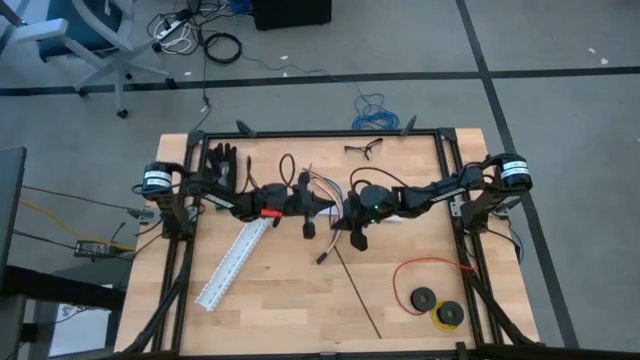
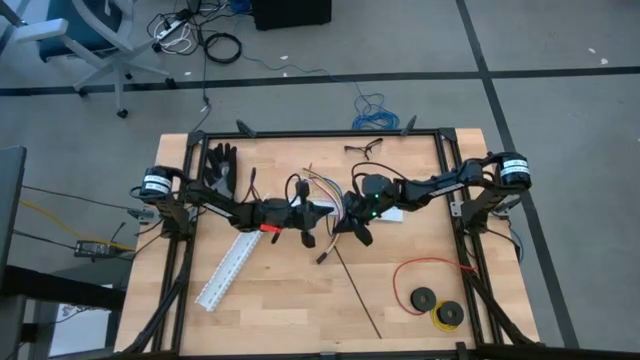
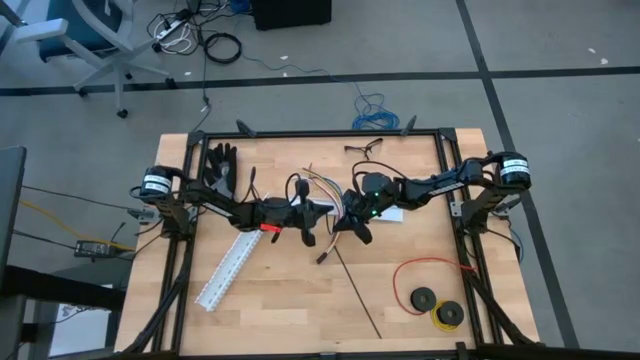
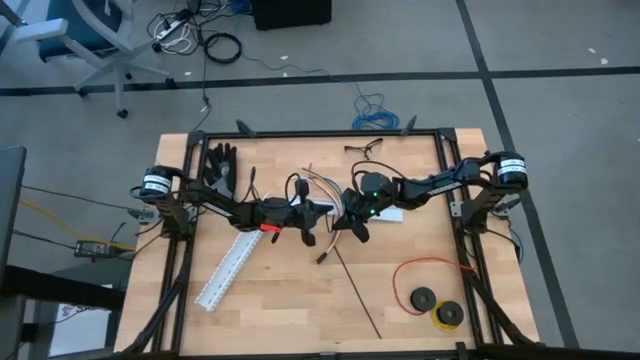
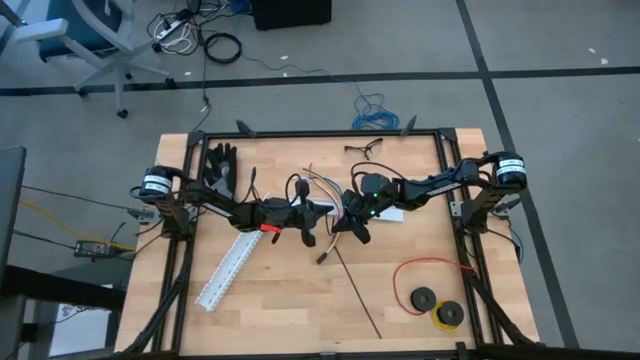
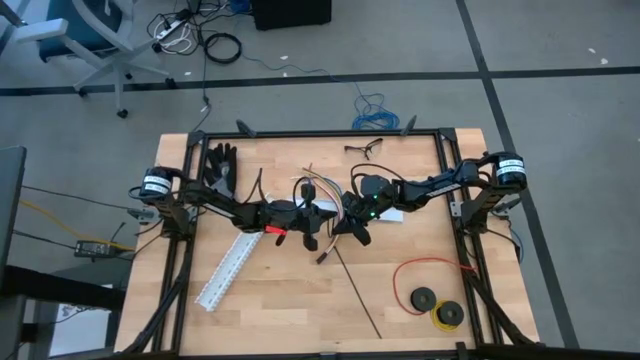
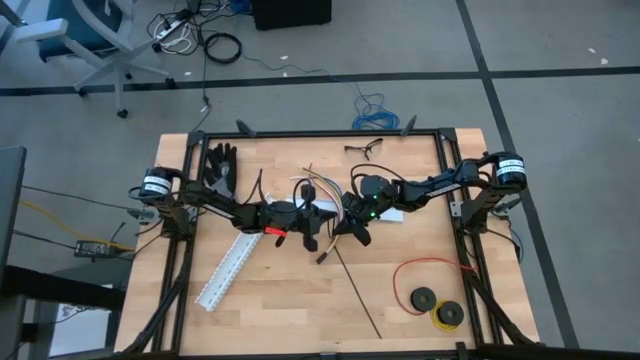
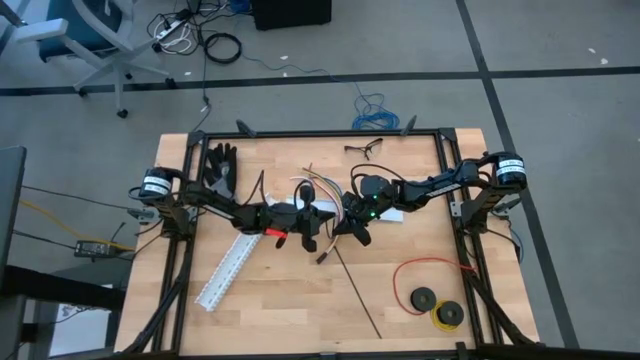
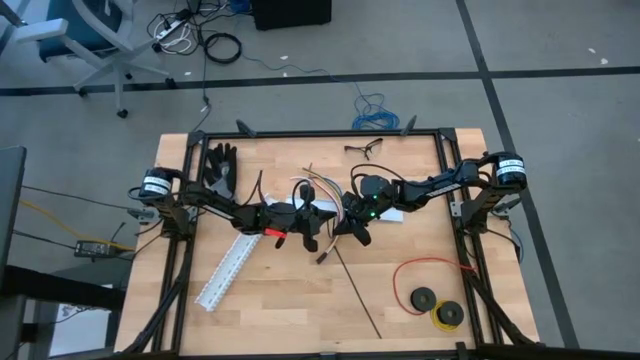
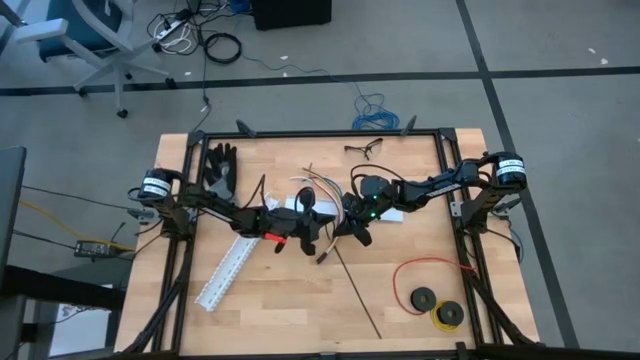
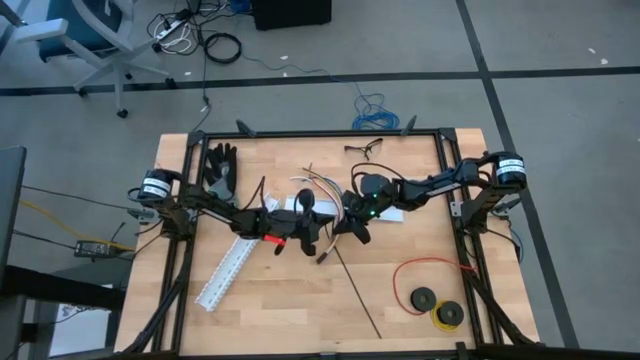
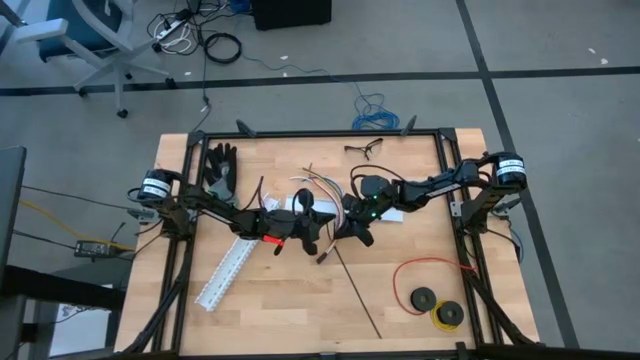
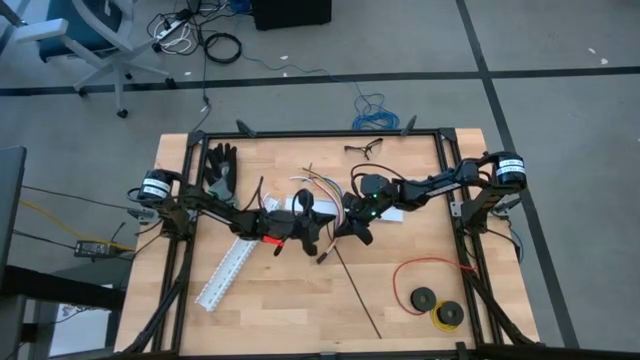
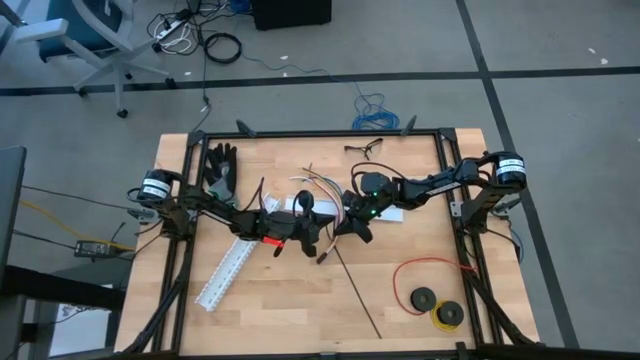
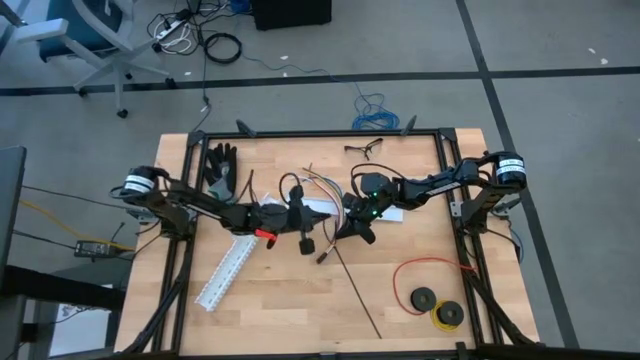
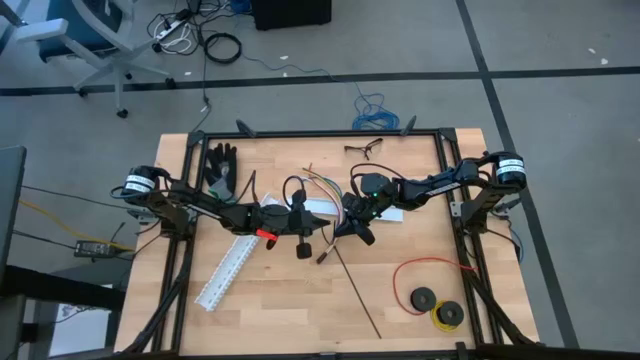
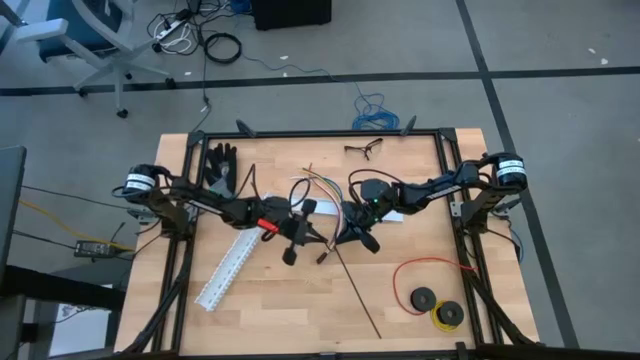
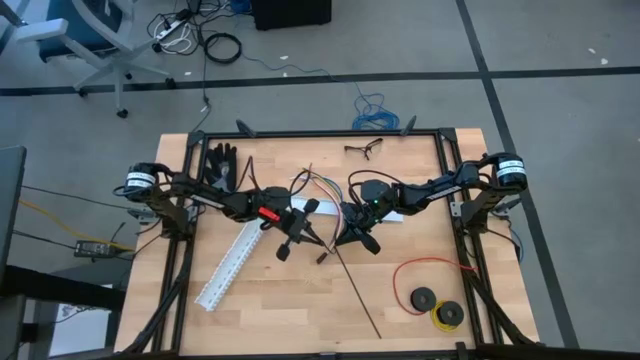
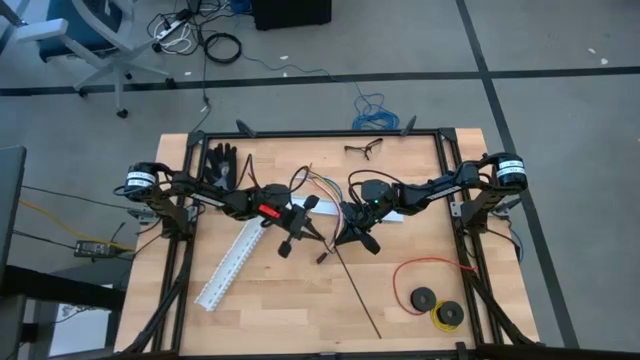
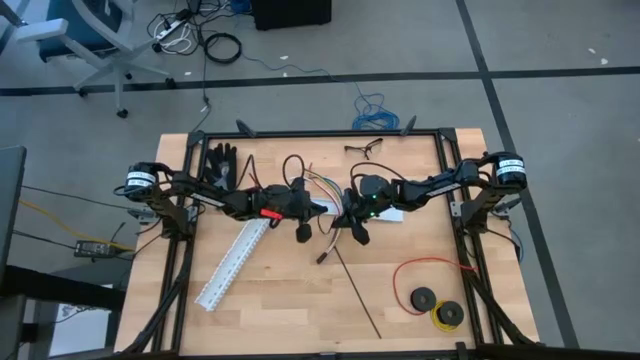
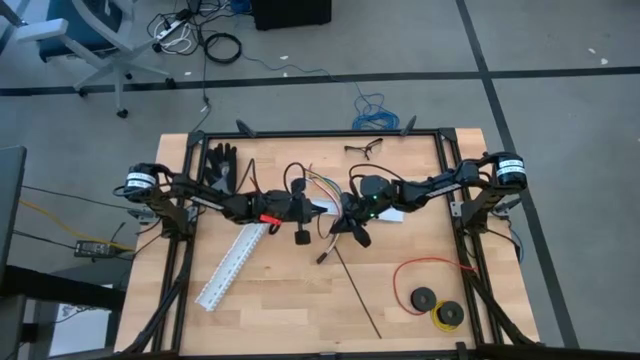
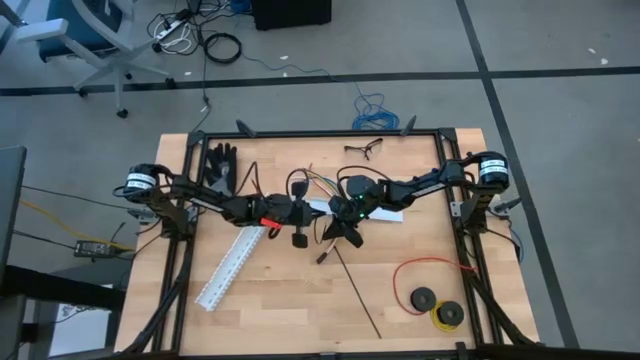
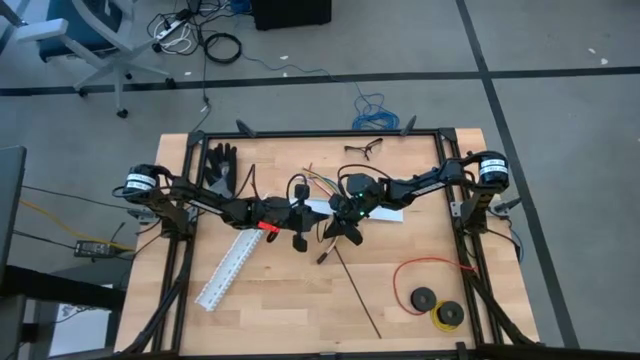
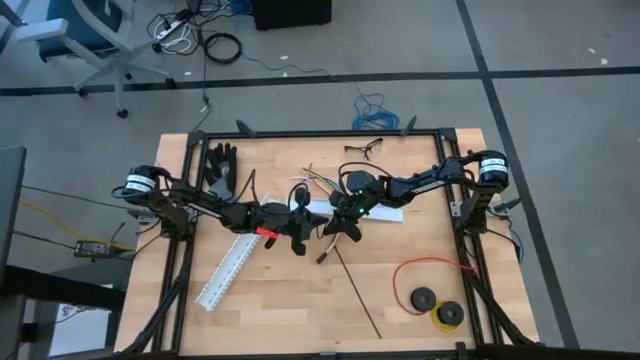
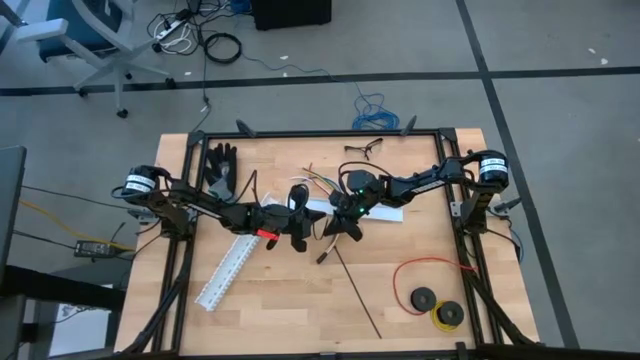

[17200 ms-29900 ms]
Task: Ziptie cables
Wrap the cables together using a black zip tie

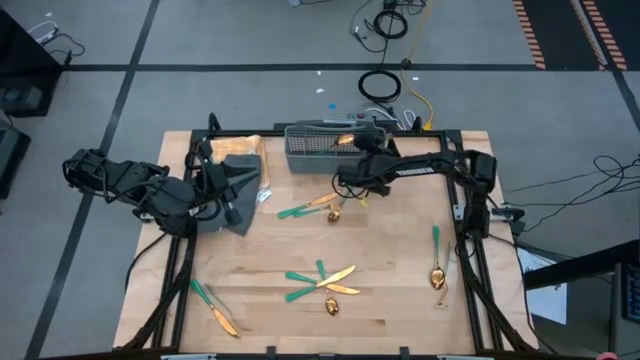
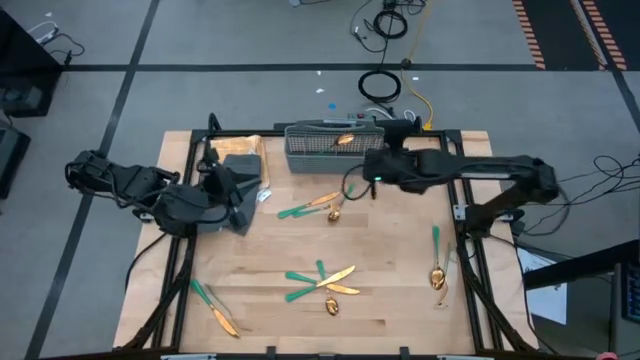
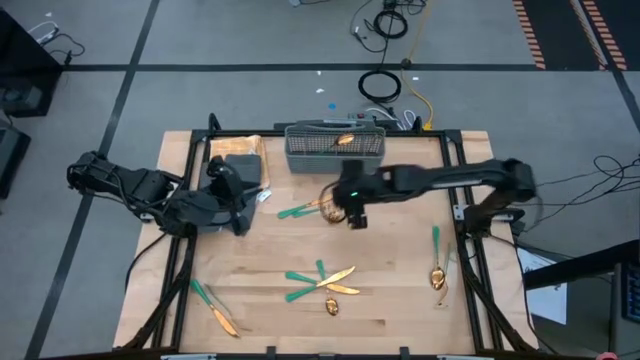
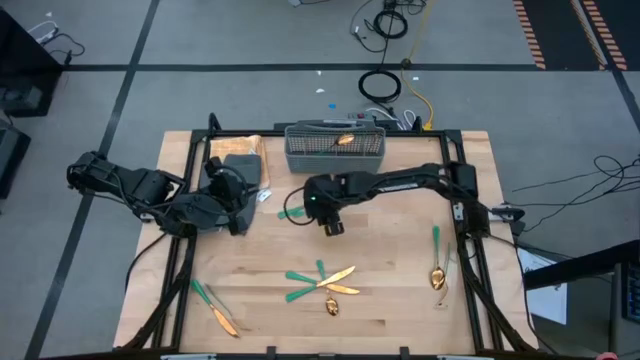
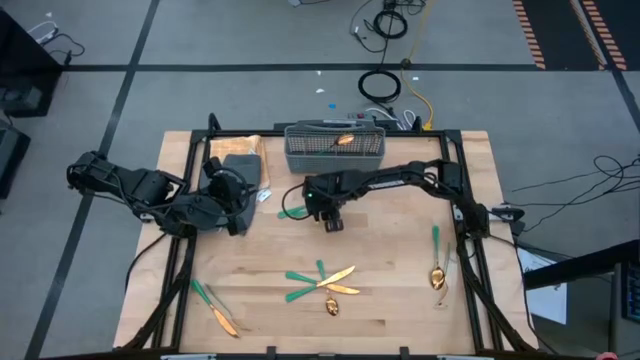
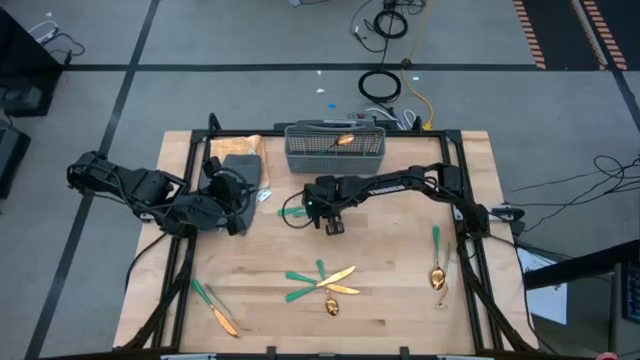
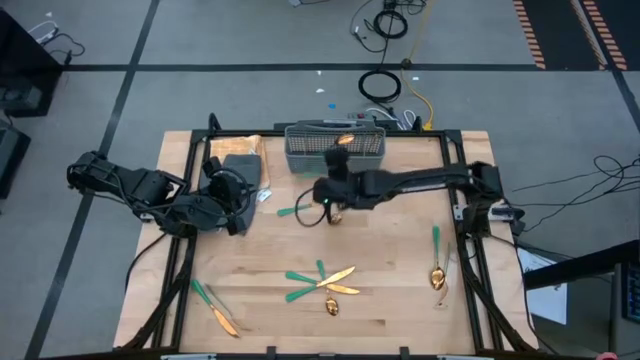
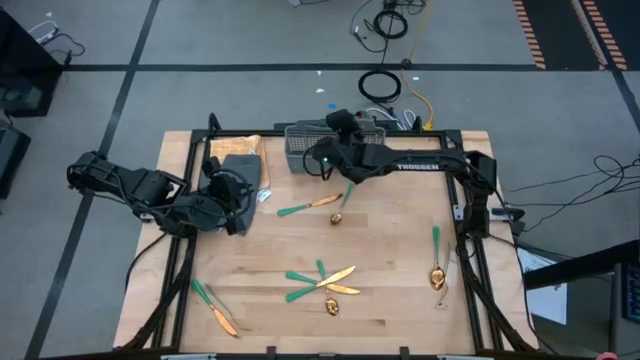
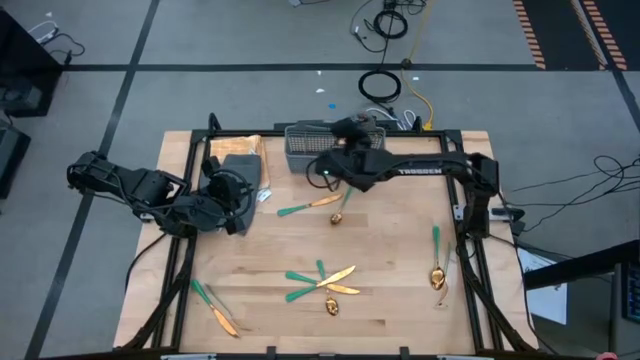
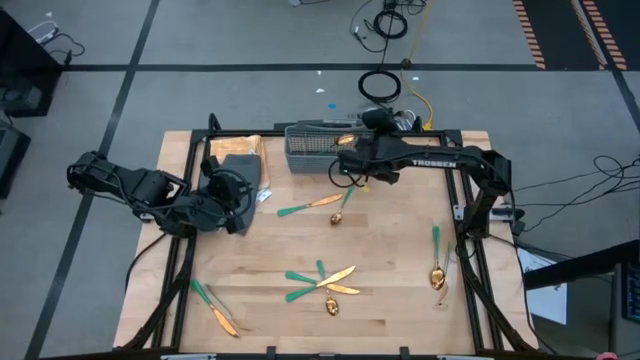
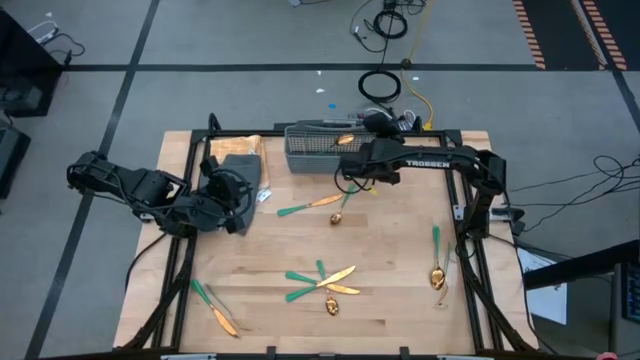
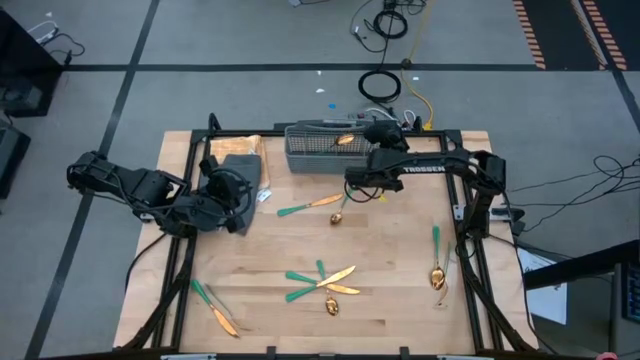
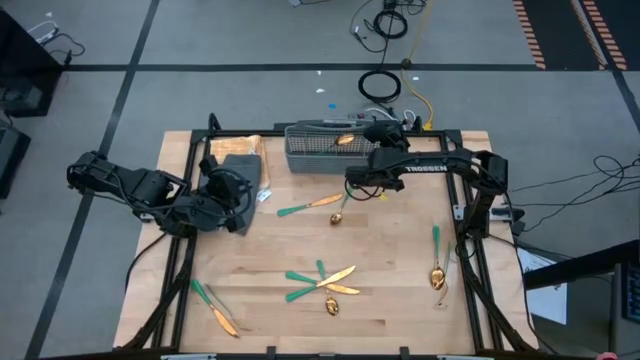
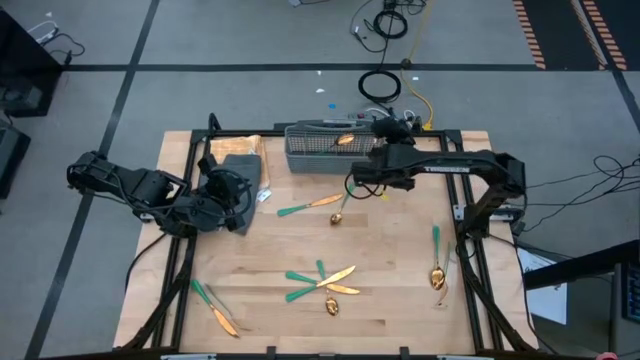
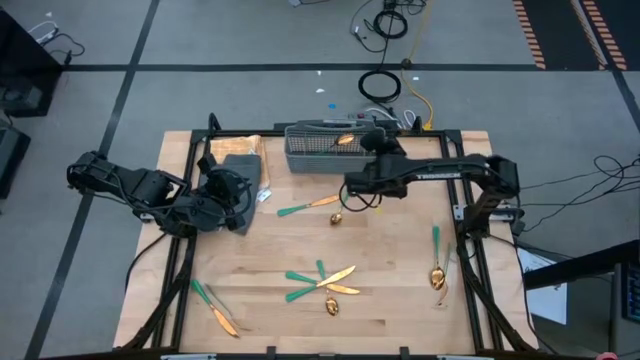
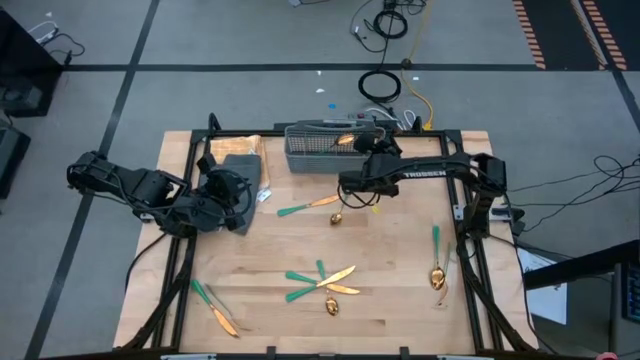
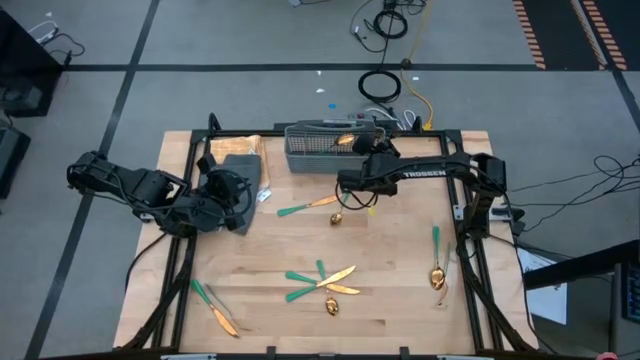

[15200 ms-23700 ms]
Task: Sort silverware
Put the green fork into the gray silverware basket
